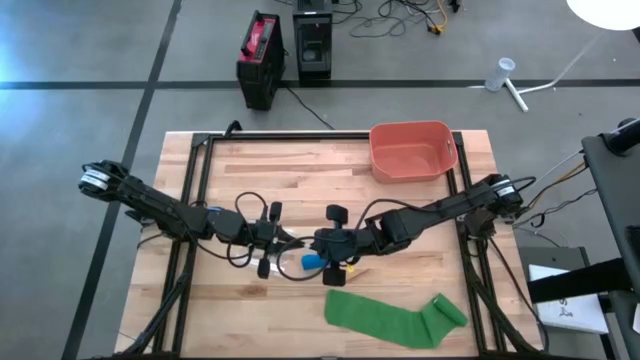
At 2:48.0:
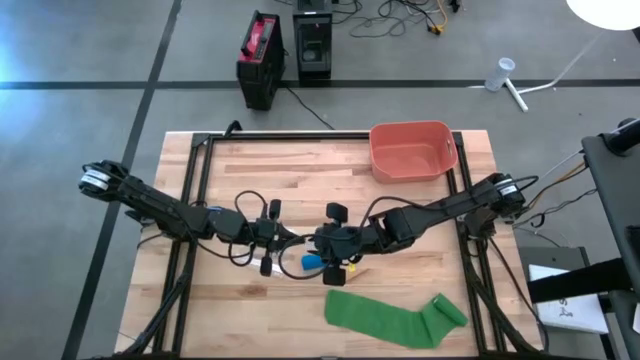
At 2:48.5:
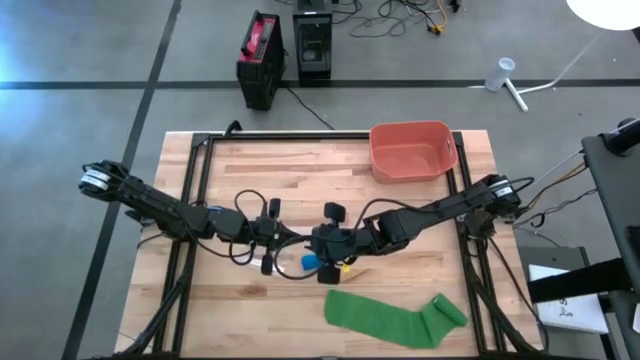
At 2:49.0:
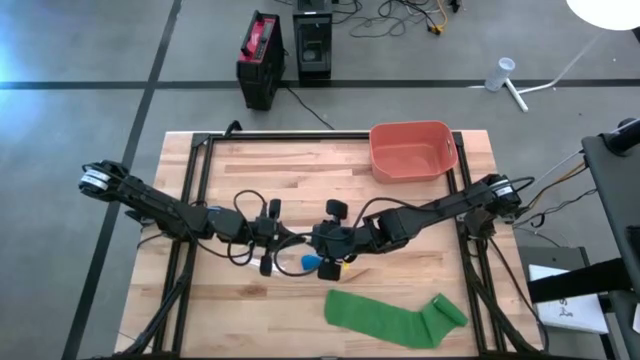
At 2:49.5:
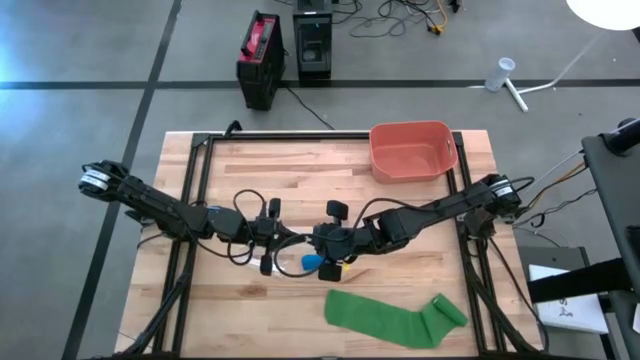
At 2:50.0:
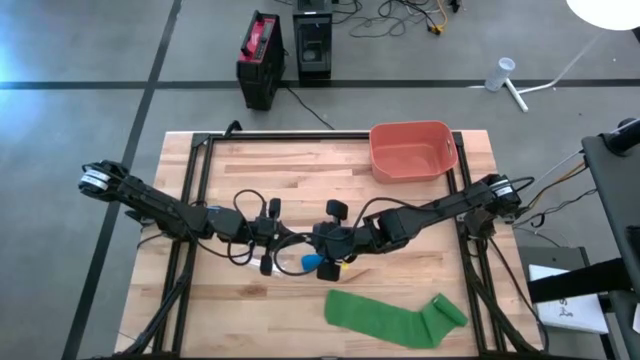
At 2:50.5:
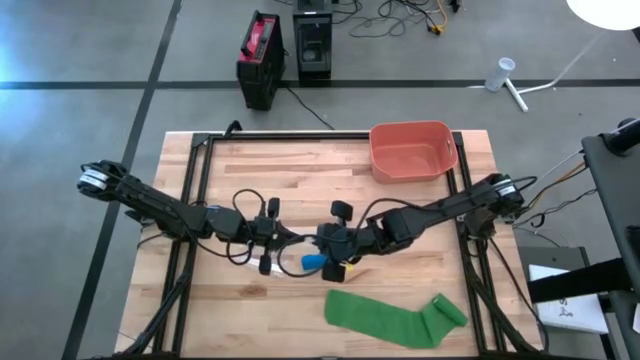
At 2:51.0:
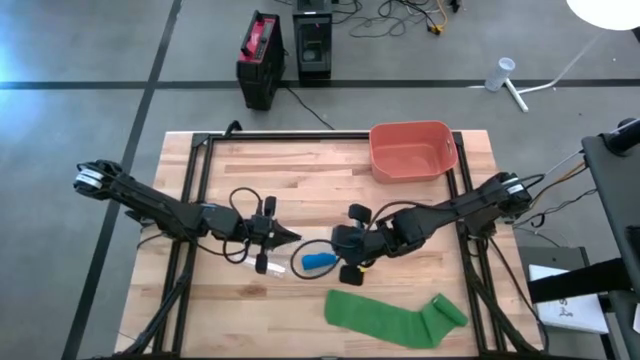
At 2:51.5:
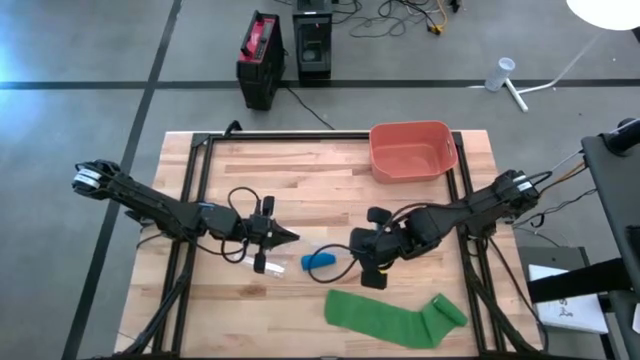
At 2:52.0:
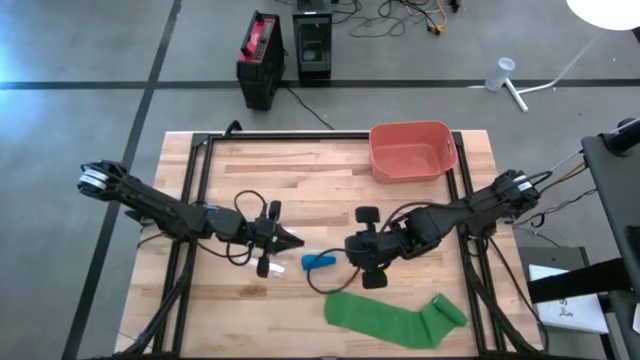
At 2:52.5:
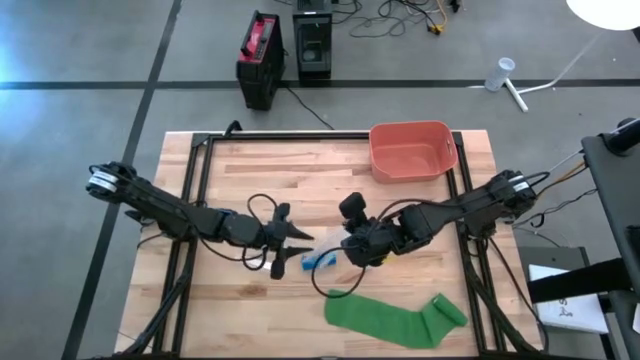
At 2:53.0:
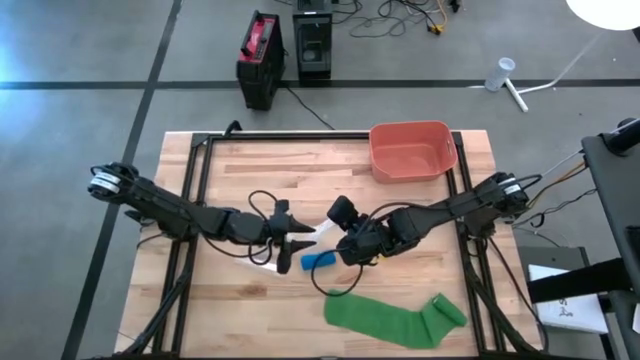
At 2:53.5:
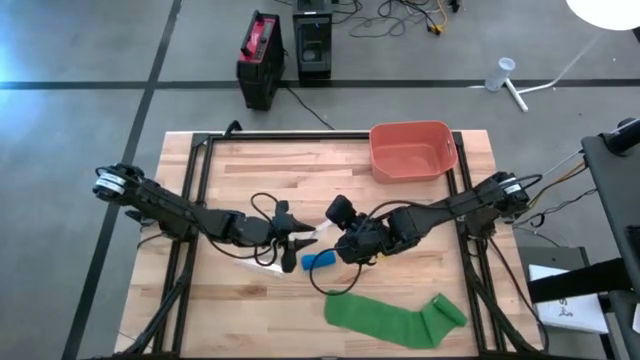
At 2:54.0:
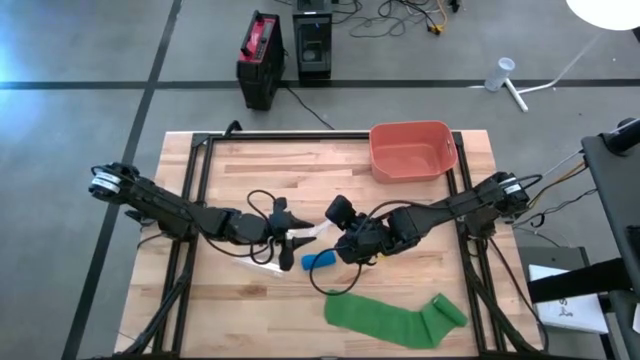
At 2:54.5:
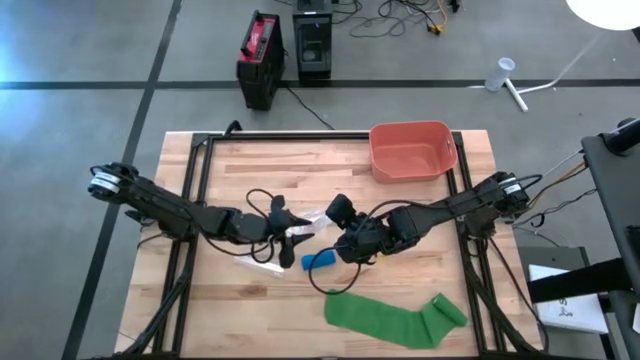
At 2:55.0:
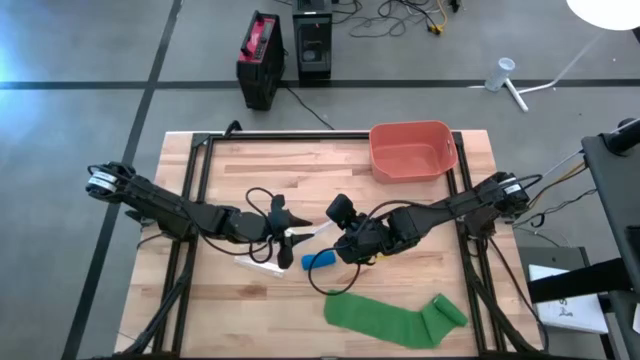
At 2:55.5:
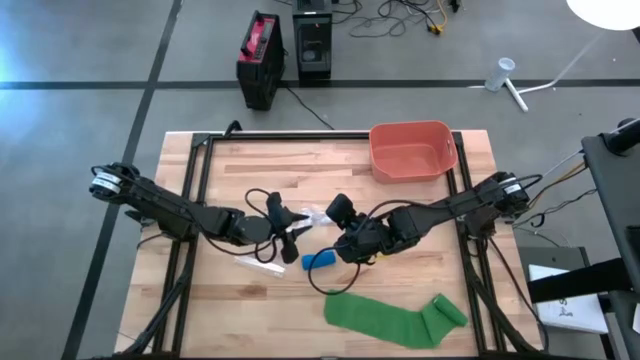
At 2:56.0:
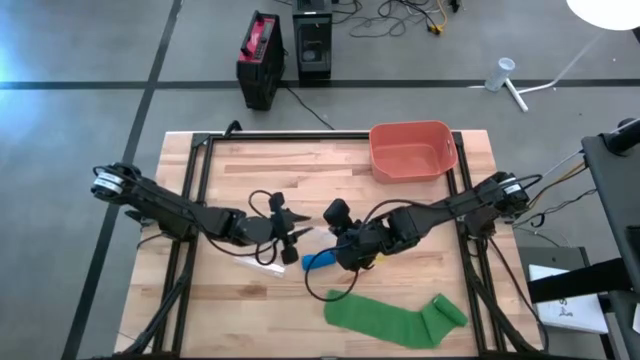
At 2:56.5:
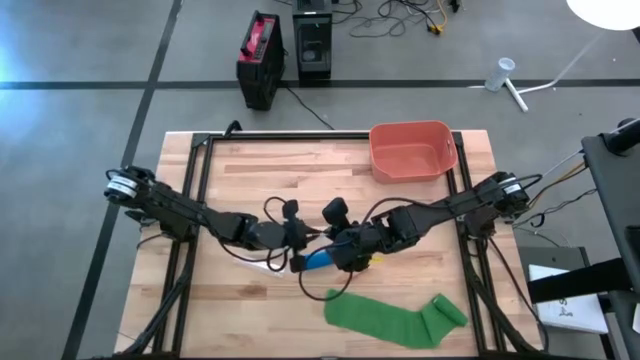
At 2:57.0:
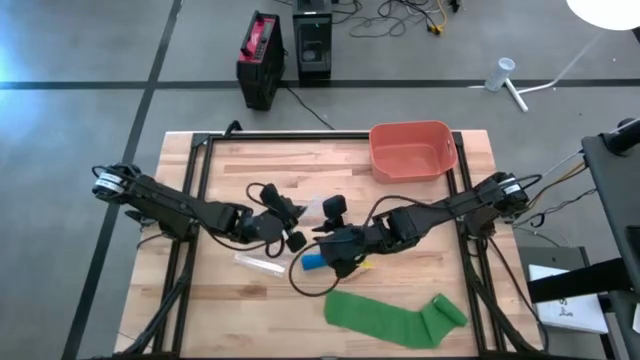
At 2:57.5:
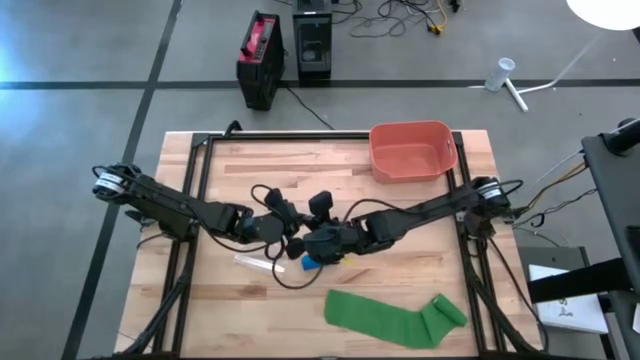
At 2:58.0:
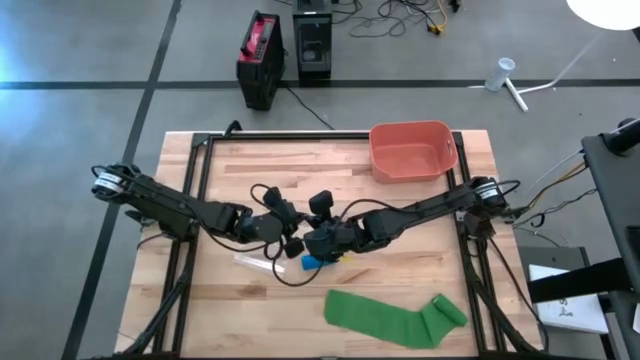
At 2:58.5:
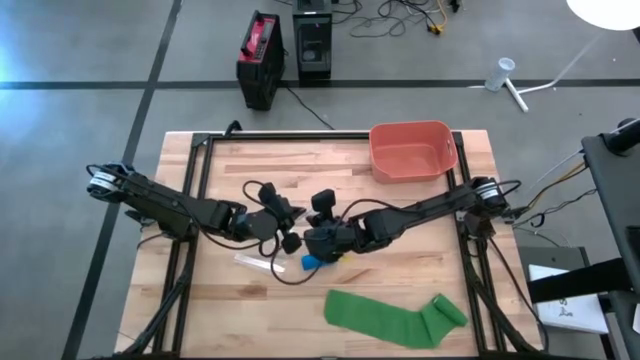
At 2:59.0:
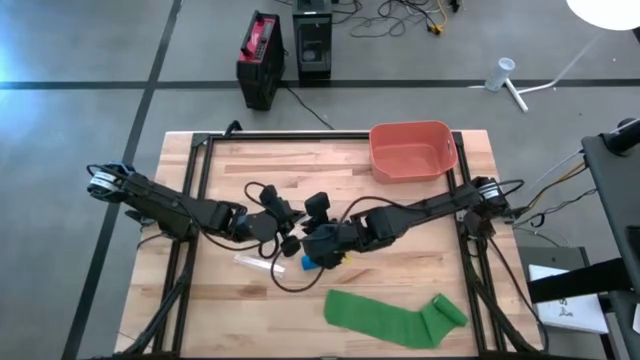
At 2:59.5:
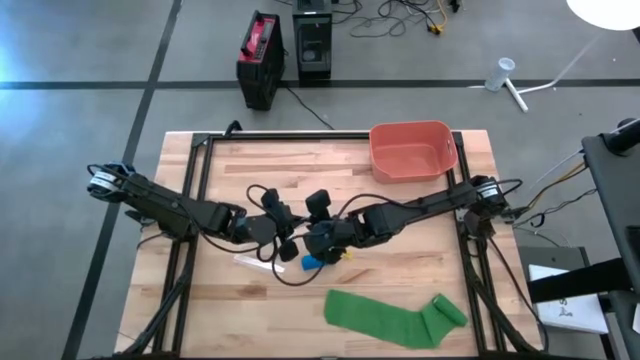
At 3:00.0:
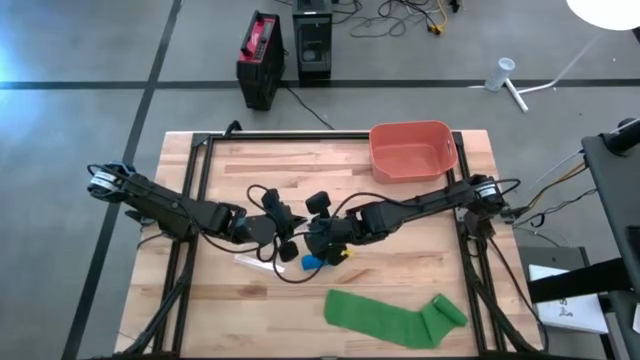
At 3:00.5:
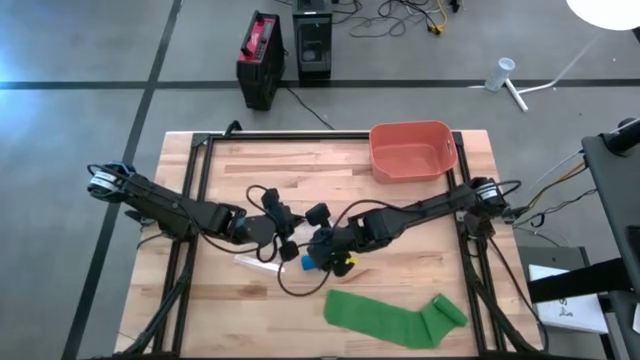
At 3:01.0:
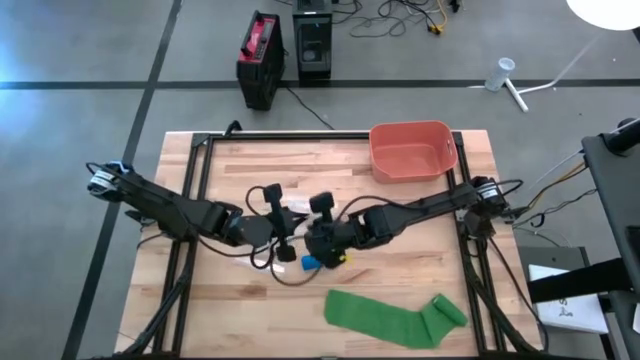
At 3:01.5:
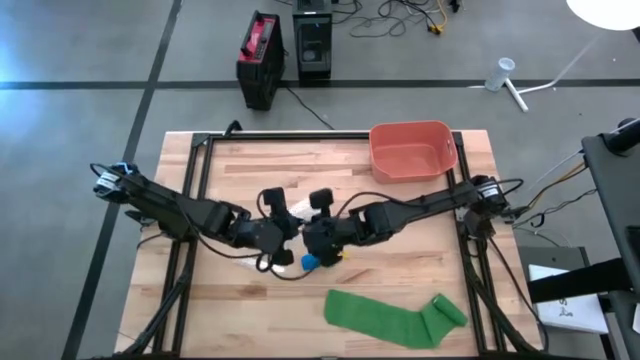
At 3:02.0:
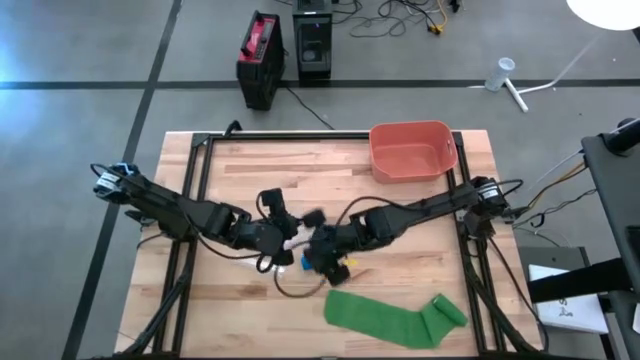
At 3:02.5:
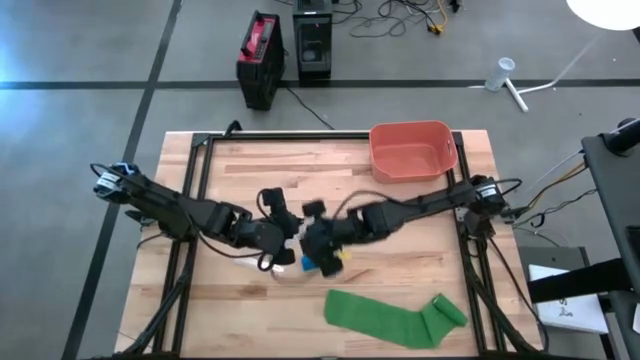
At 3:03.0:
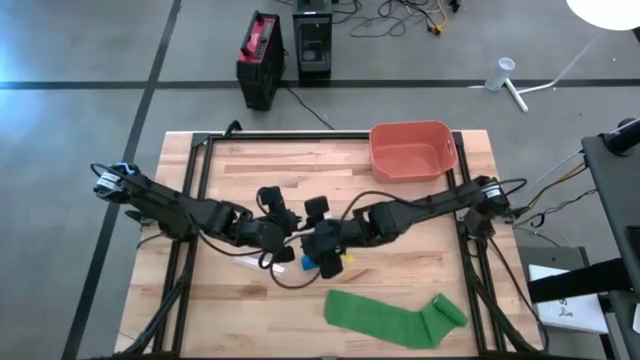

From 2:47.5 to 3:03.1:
Task: Roll bandage
Open the transparent zip bag

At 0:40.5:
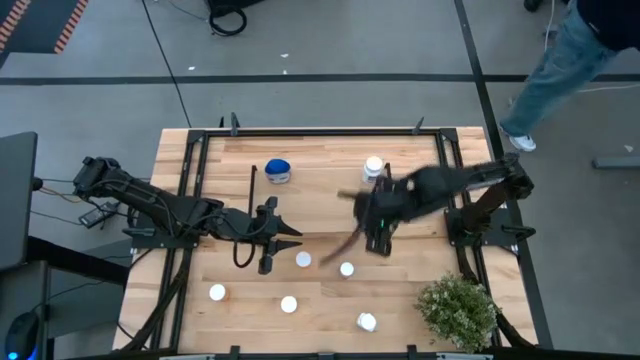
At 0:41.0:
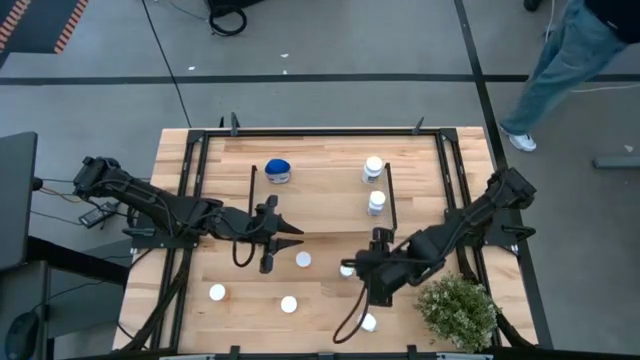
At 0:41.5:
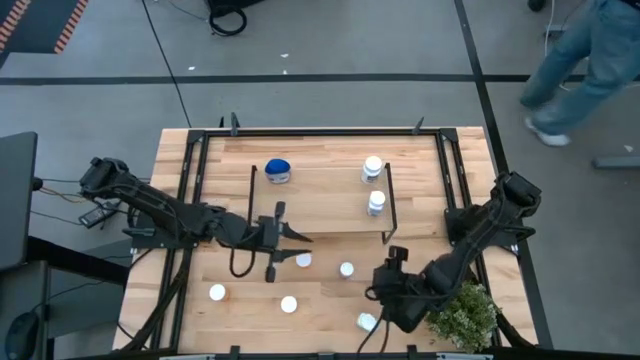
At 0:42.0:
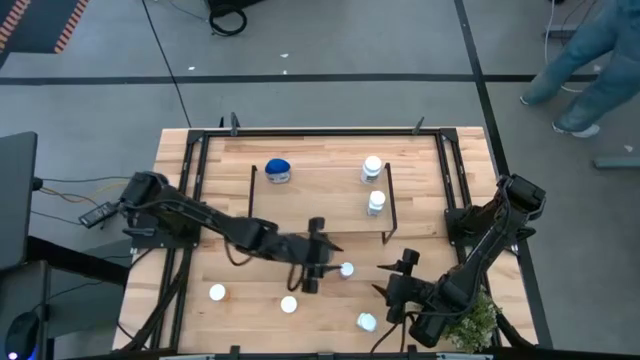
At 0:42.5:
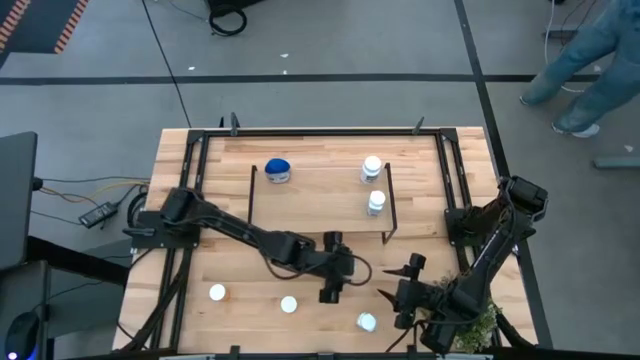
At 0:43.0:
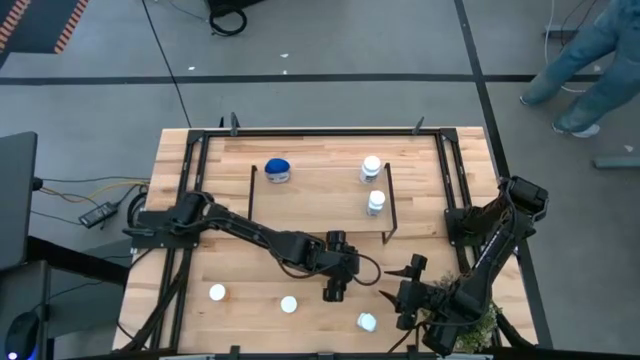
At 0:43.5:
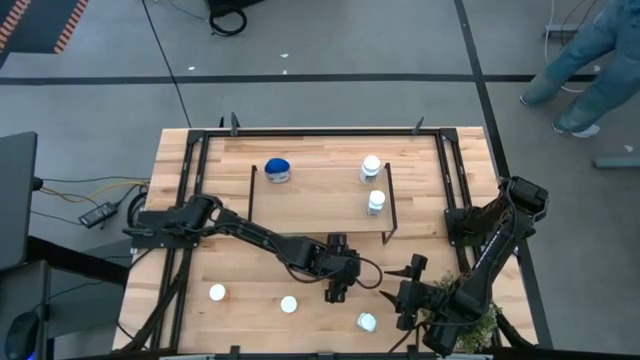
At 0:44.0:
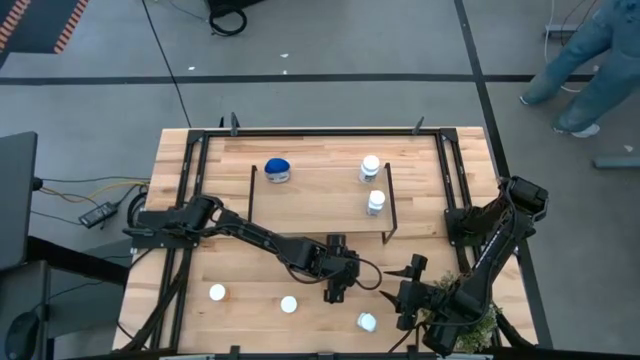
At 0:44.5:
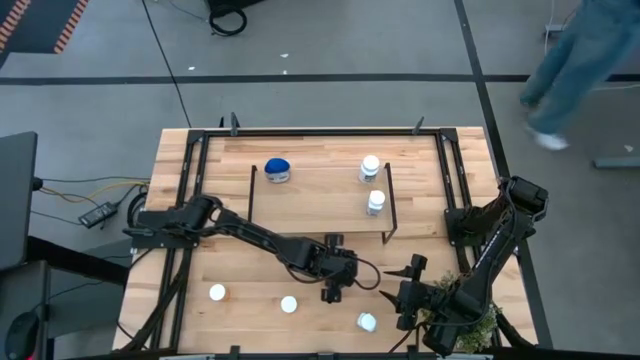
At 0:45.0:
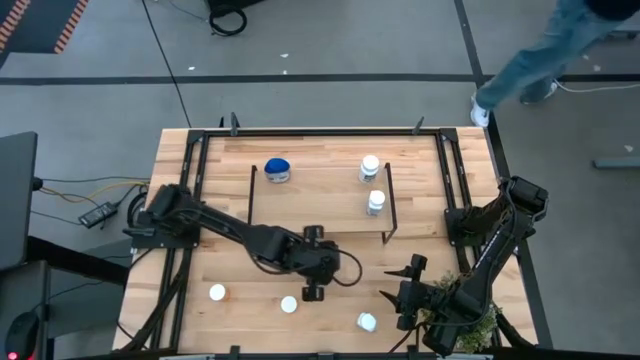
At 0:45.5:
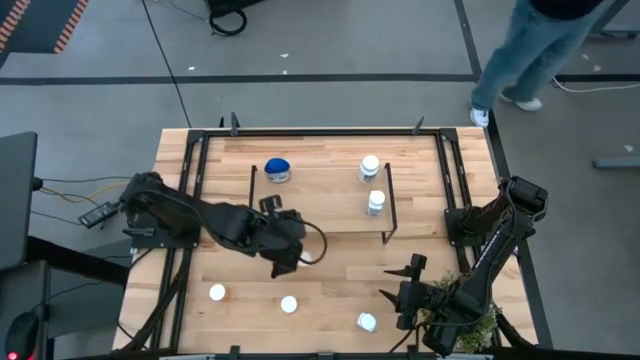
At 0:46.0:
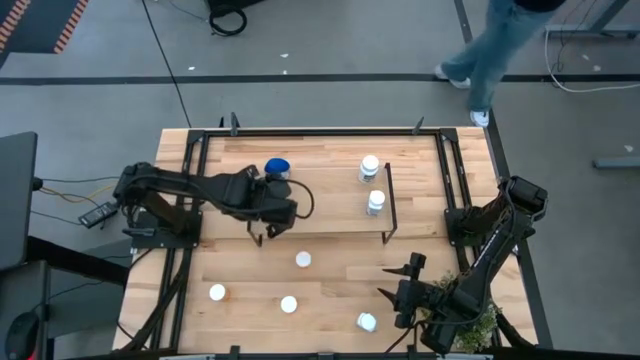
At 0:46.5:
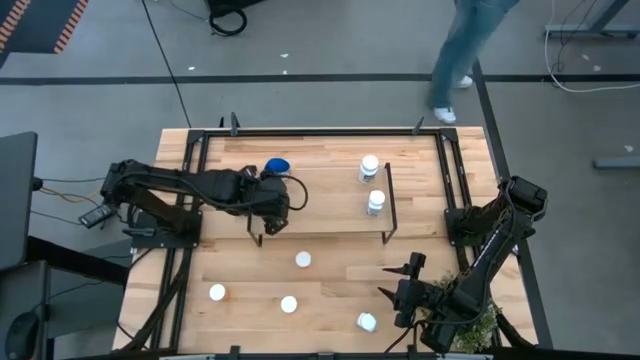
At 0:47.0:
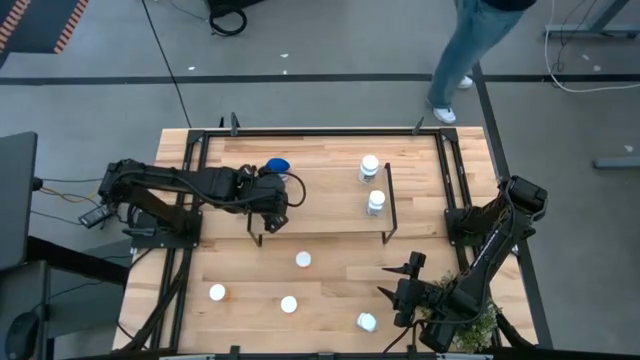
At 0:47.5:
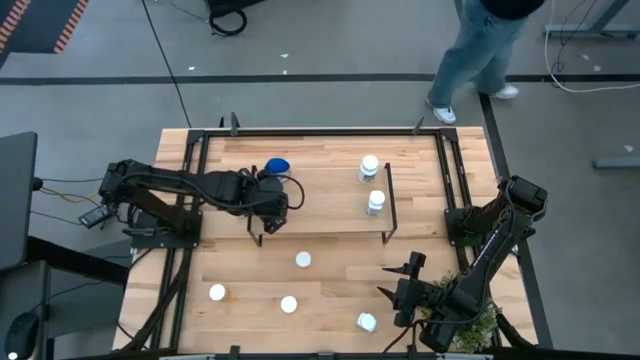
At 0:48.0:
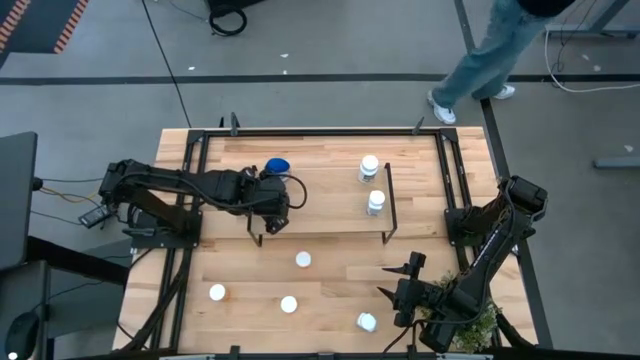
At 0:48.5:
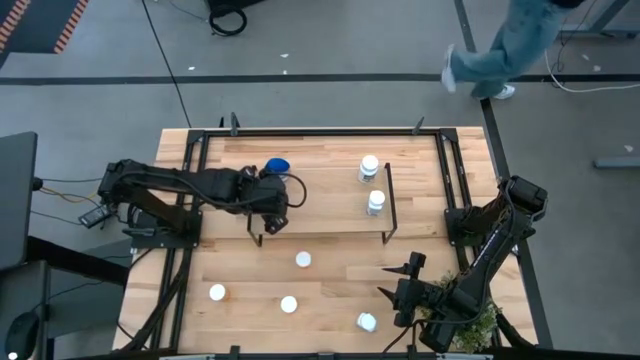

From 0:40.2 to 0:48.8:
Task: Pick and place medicine bottles onto shelf by color
Put the pink medicine bottle on the shelf
